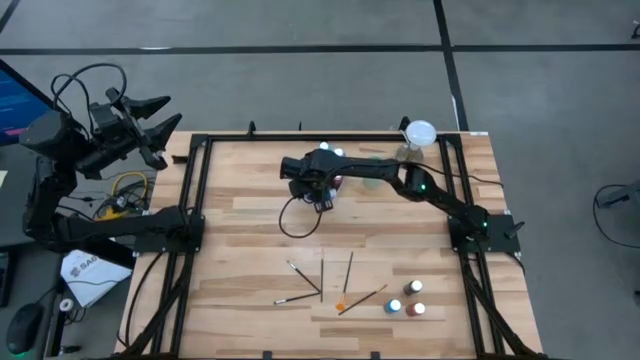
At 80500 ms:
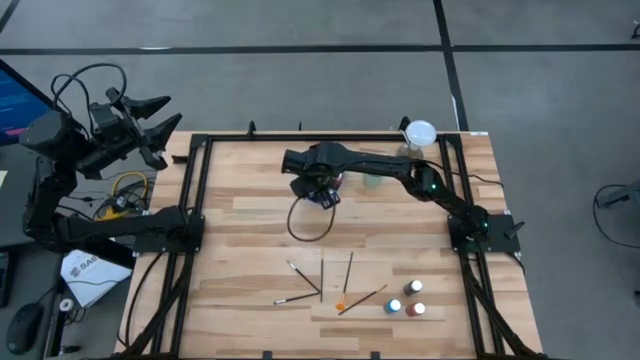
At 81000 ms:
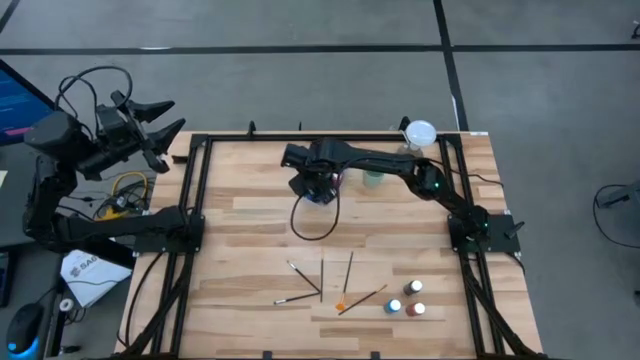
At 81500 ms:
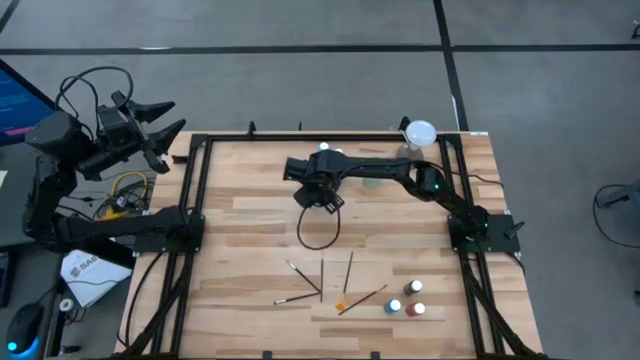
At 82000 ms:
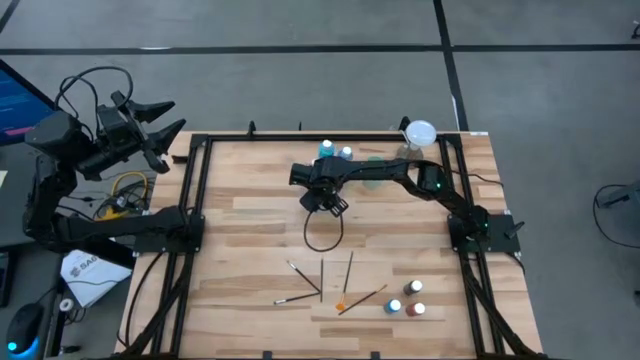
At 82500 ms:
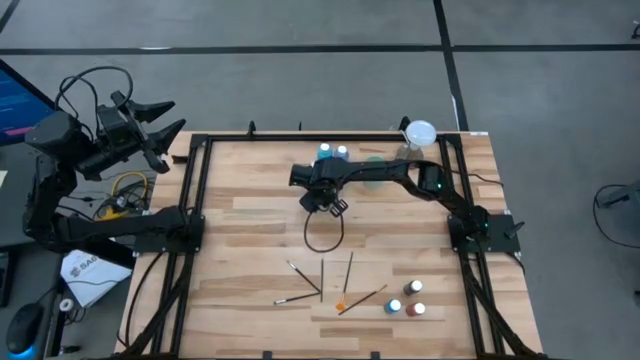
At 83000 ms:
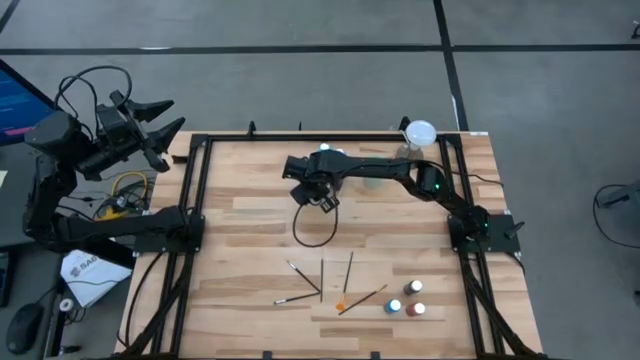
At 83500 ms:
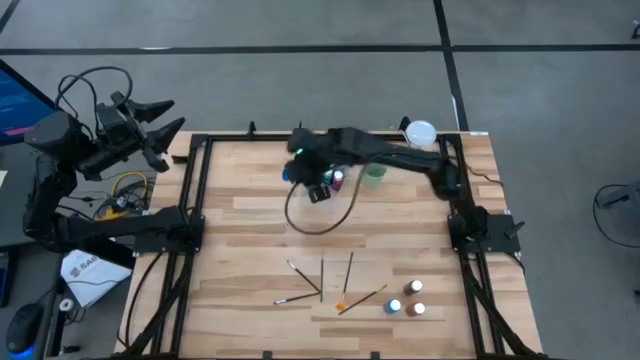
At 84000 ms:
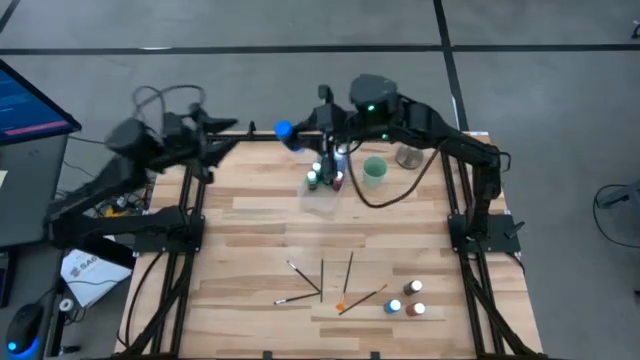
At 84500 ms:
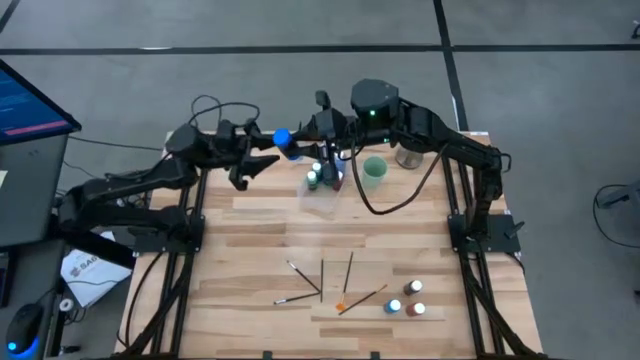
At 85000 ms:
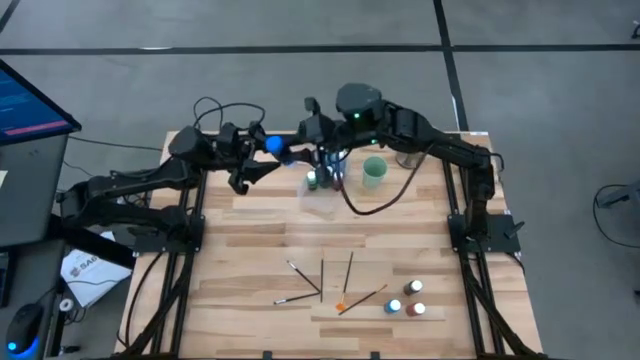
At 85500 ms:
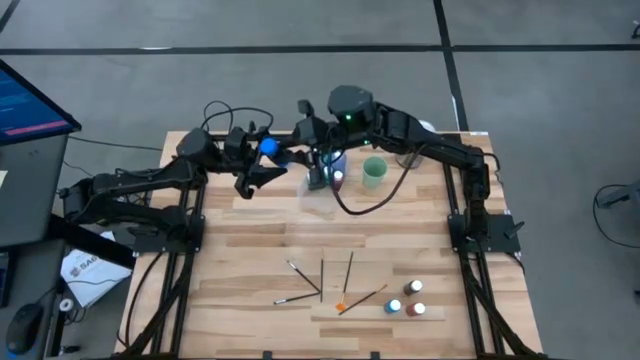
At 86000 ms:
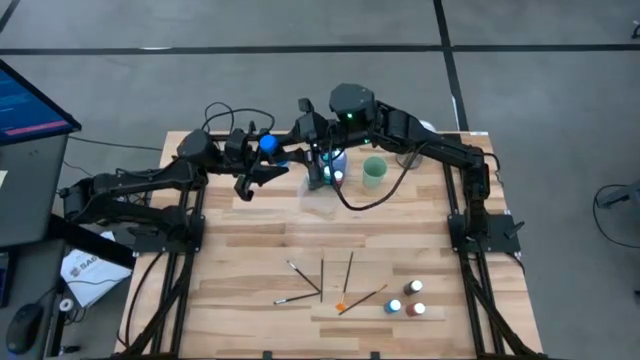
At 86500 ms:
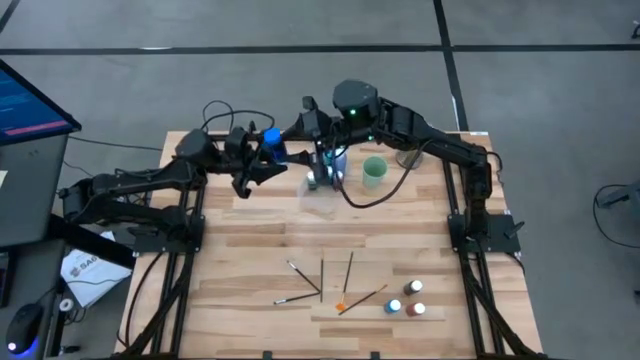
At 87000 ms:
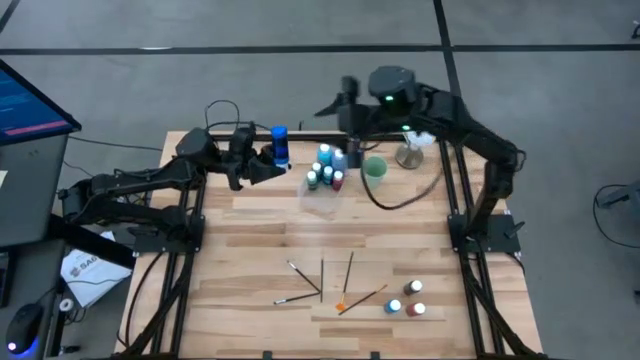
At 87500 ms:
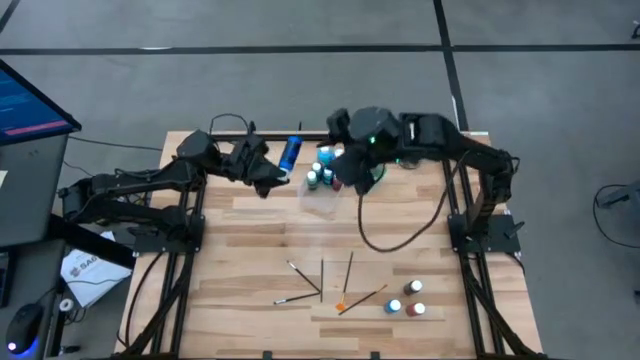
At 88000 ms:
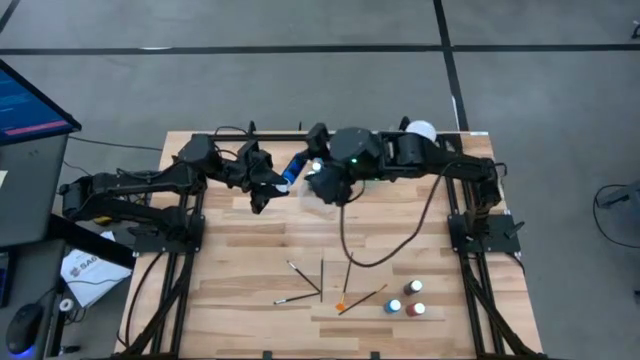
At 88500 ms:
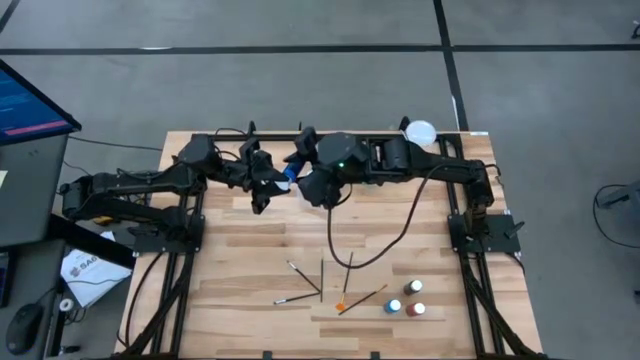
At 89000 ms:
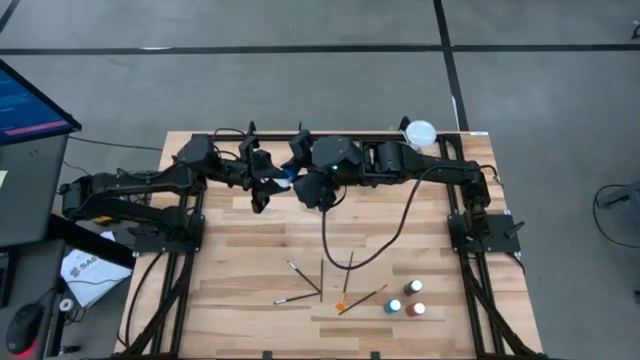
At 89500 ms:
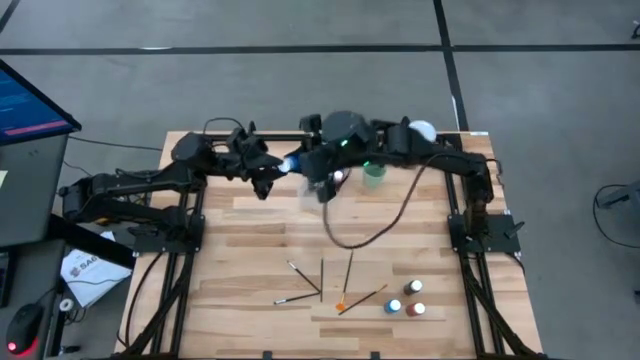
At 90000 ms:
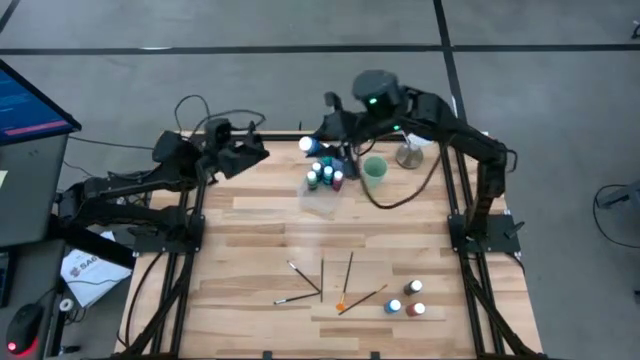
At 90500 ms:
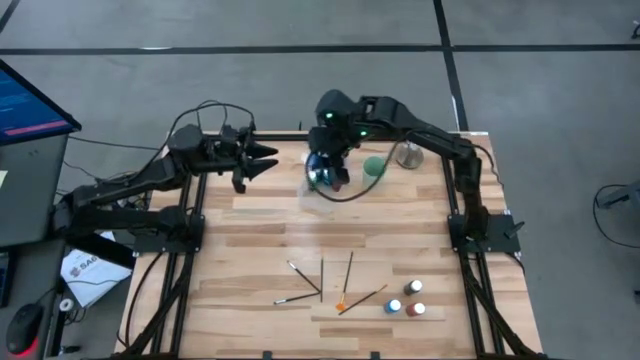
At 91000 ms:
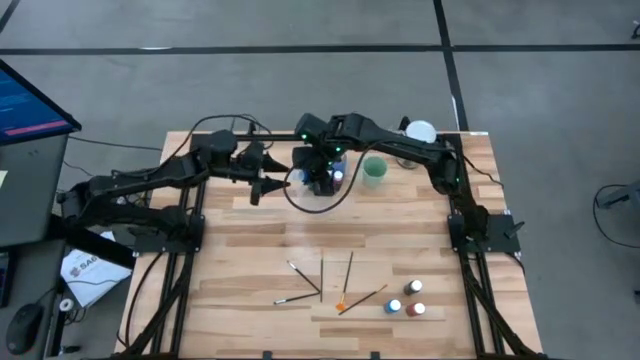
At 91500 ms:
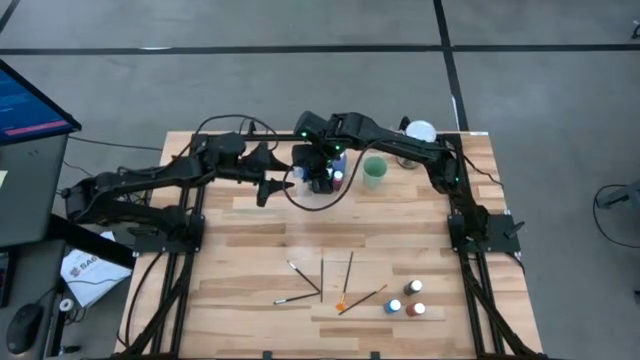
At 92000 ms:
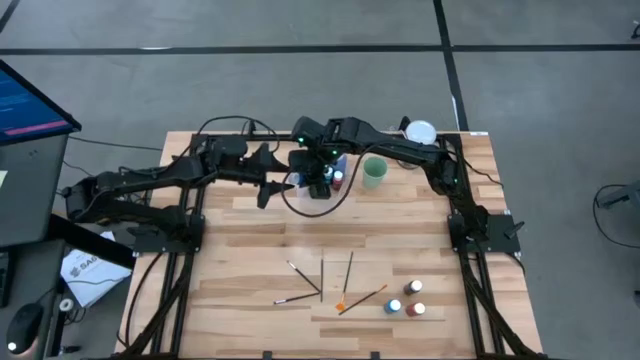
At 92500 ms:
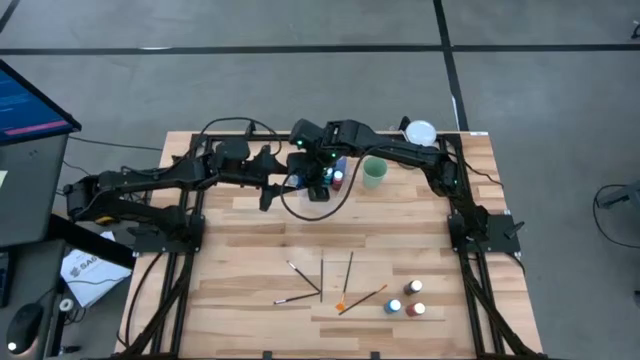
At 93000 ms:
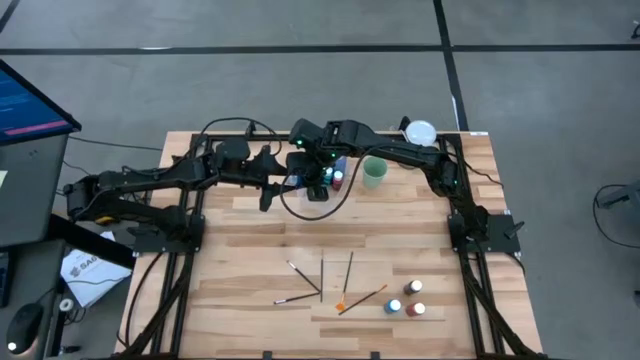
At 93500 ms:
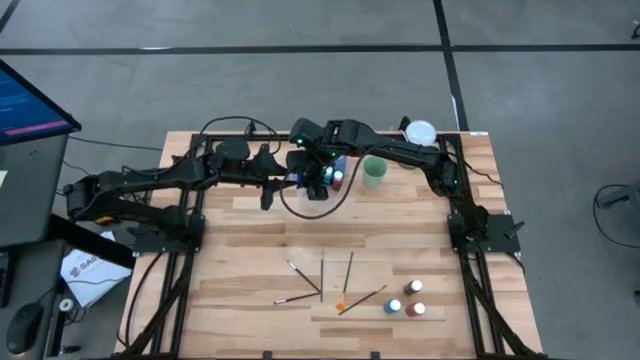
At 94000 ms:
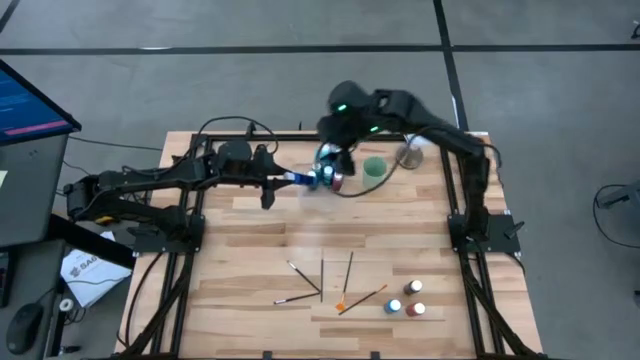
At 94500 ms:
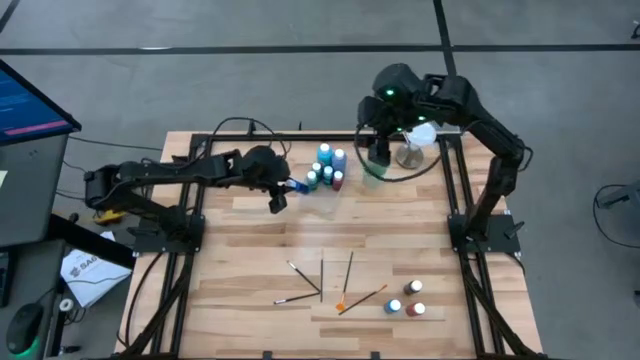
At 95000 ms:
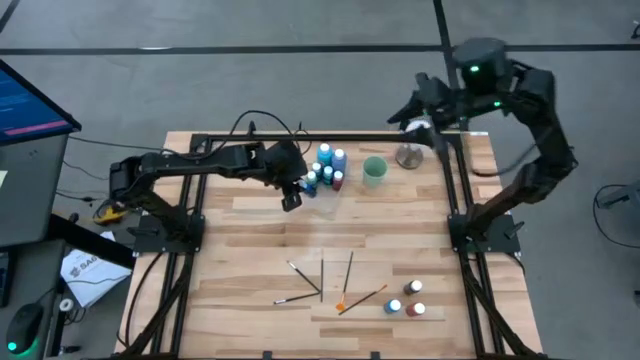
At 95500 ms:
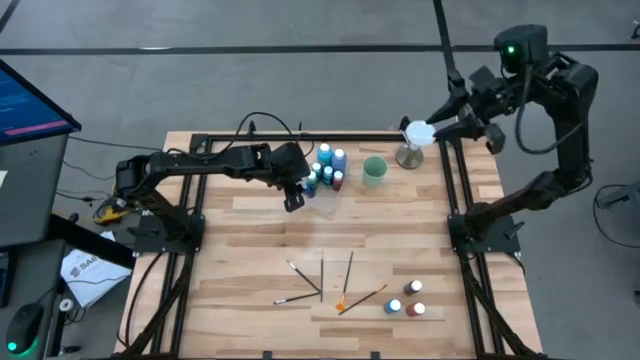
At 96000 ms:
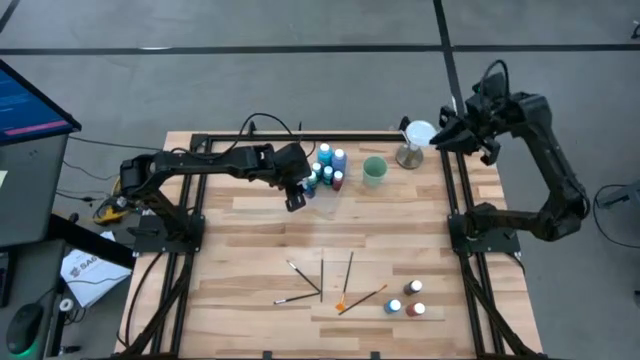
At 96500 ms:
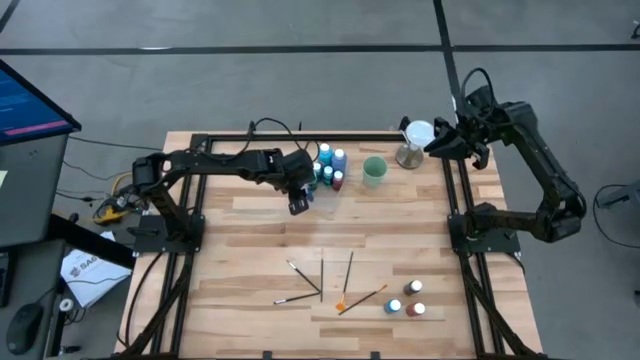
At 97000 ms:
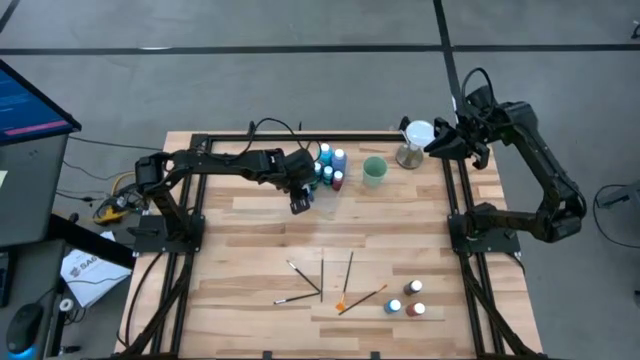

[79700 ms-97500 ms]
Task: Pick & Place Paint Supplies
Adjust the small blue paint bottle in the transparent bin

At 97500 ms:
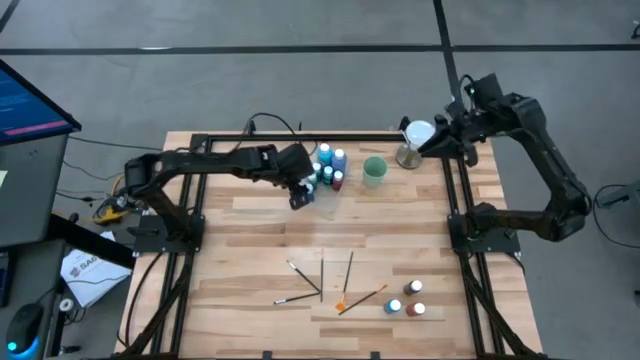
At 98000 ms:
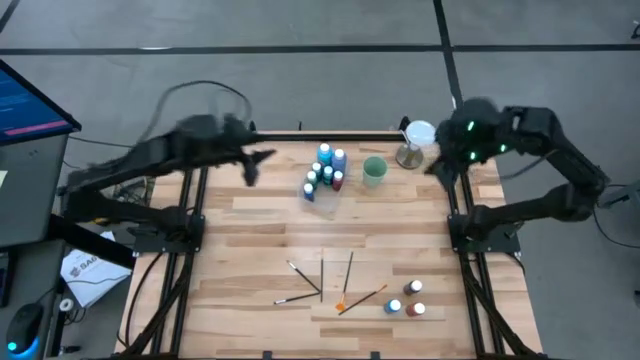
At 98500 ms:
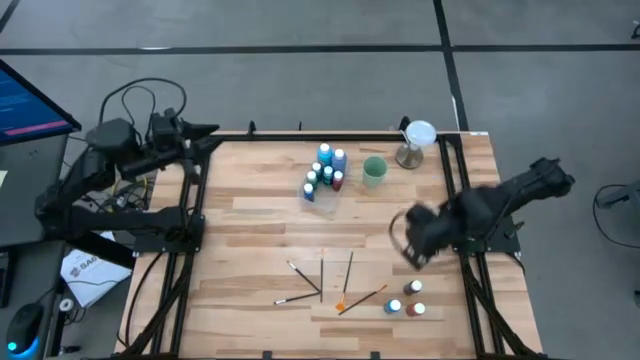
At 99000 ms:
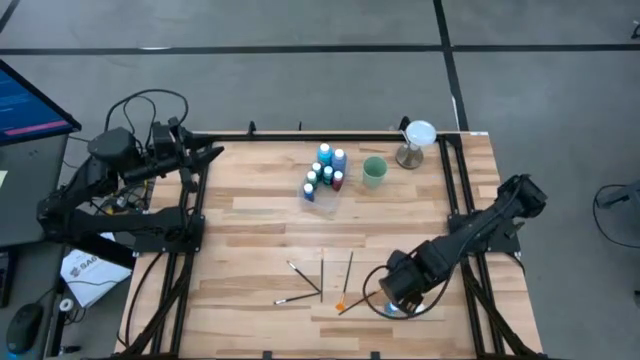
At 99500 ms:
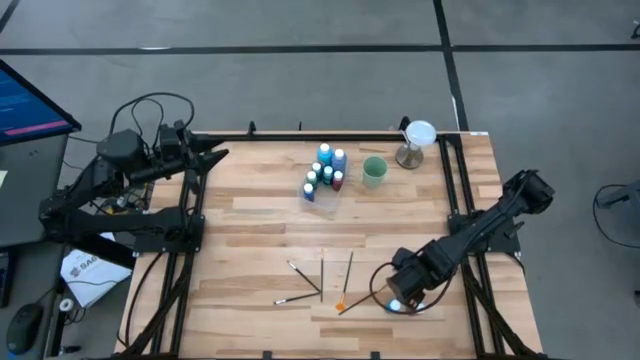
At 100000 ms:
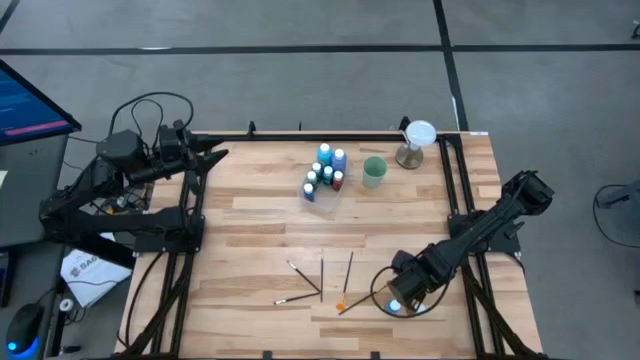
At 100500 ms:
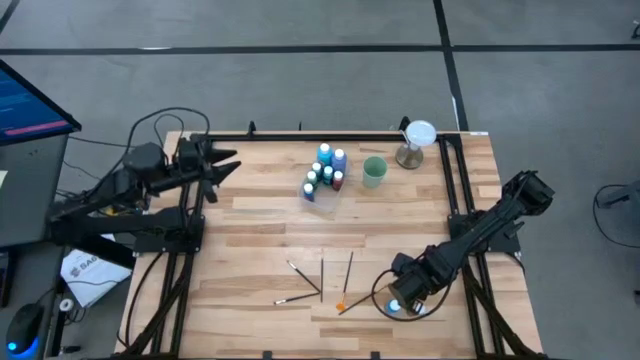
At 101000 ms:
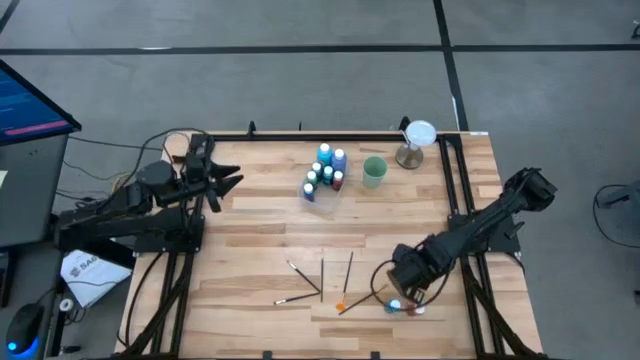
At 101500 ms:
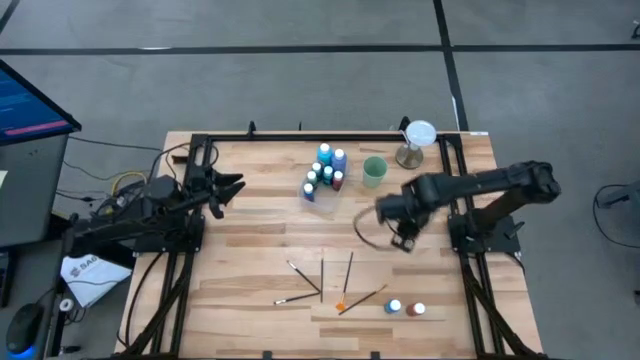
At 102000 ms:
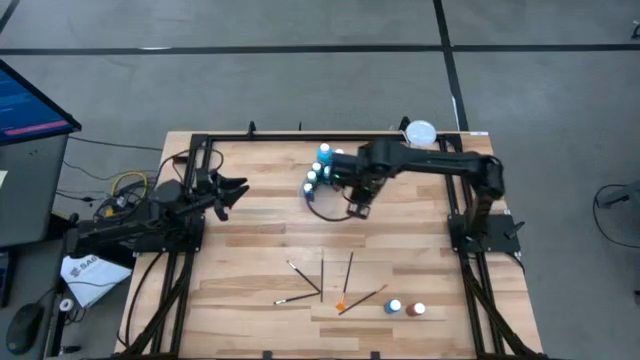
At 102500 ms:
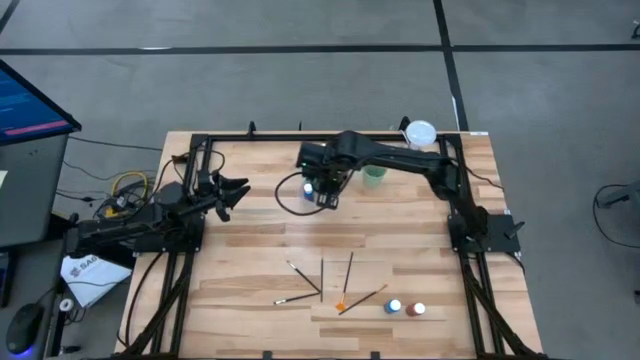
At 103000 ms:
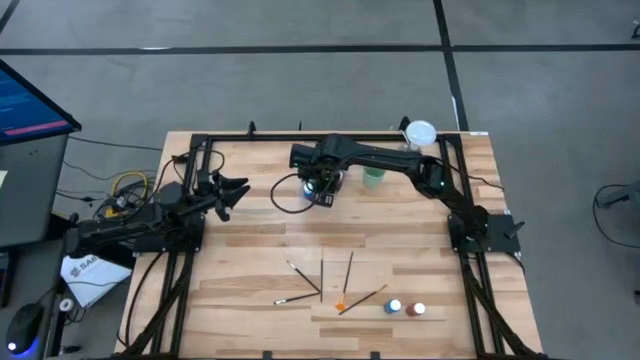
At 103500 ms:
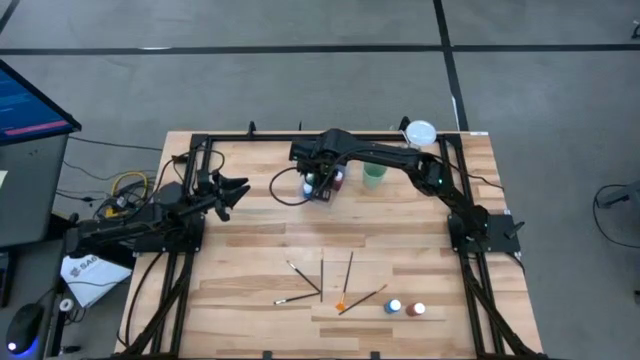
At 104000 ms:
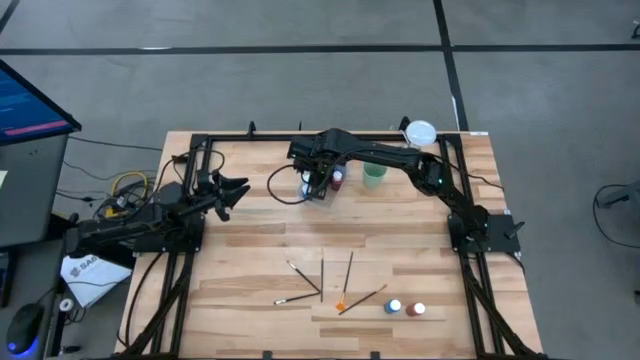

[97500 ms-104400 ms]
Put the small black paint bottle into the transparent bin
